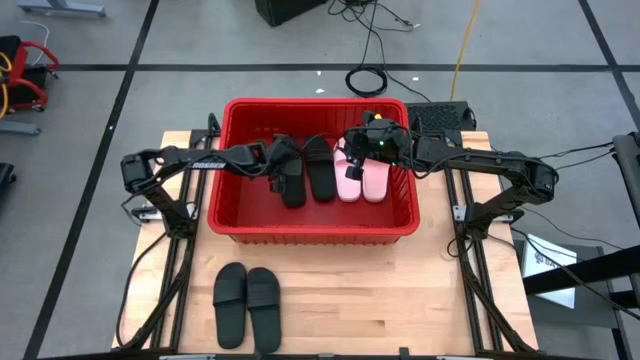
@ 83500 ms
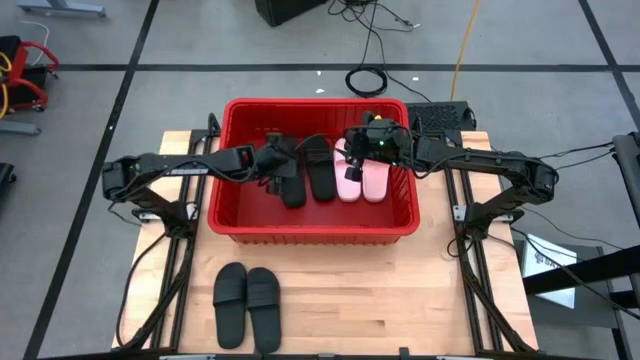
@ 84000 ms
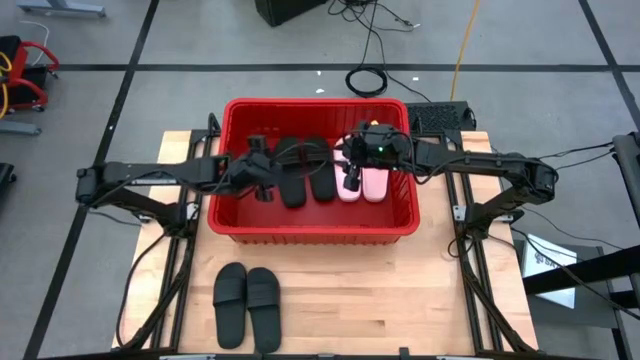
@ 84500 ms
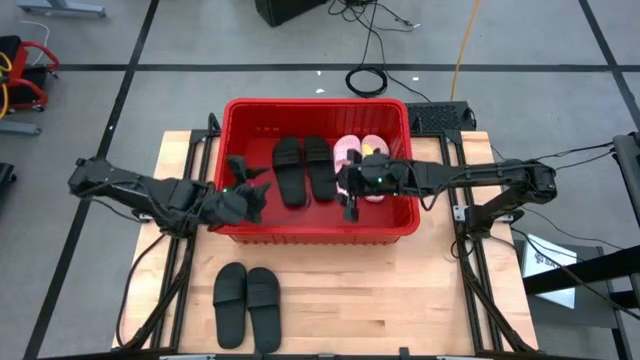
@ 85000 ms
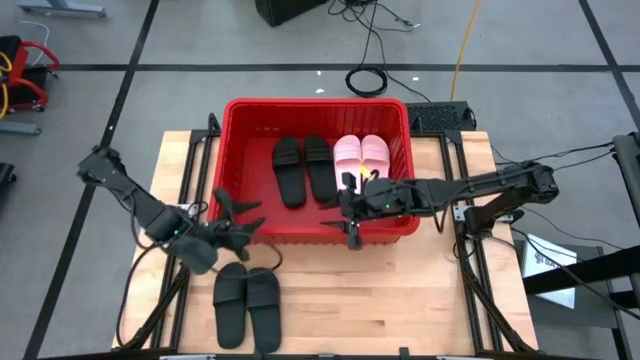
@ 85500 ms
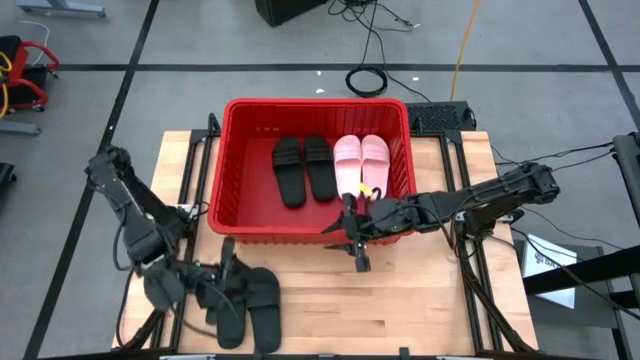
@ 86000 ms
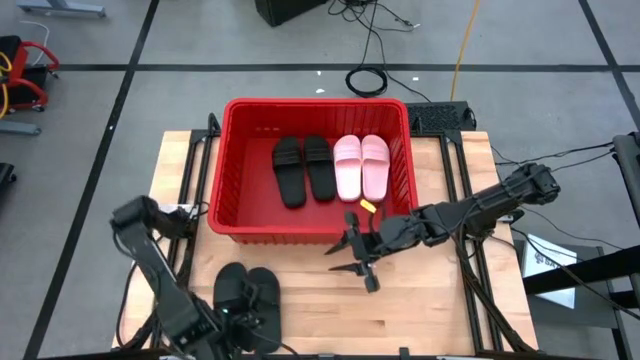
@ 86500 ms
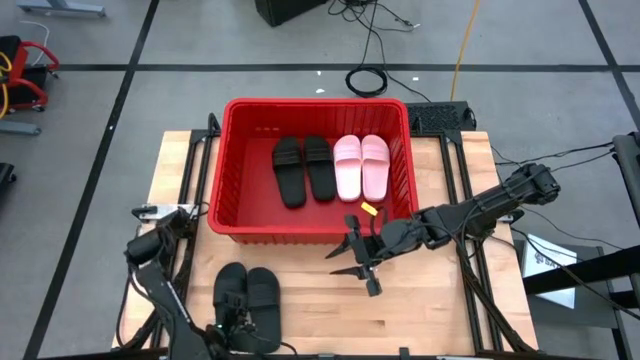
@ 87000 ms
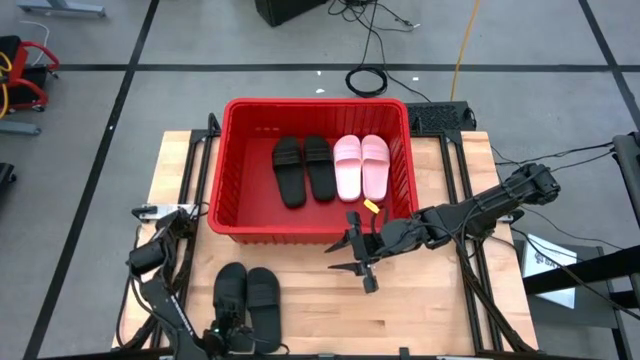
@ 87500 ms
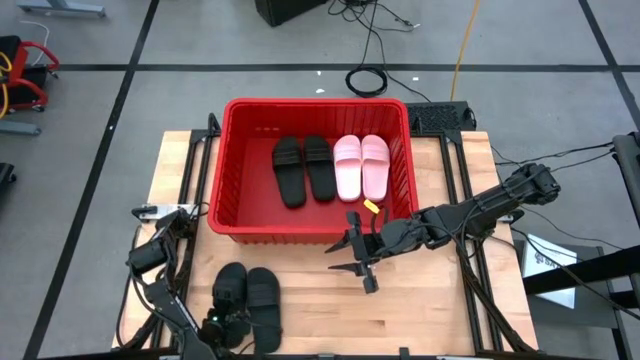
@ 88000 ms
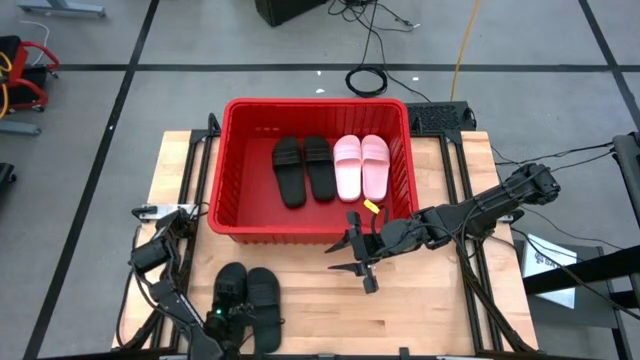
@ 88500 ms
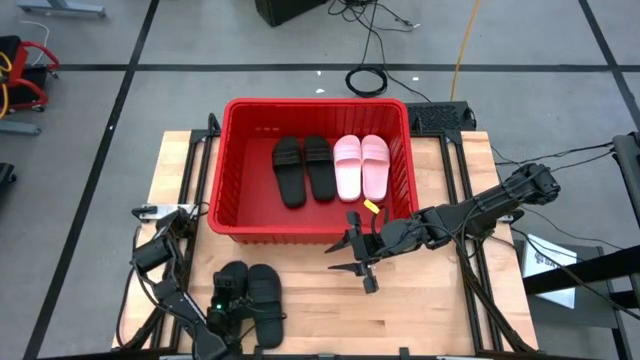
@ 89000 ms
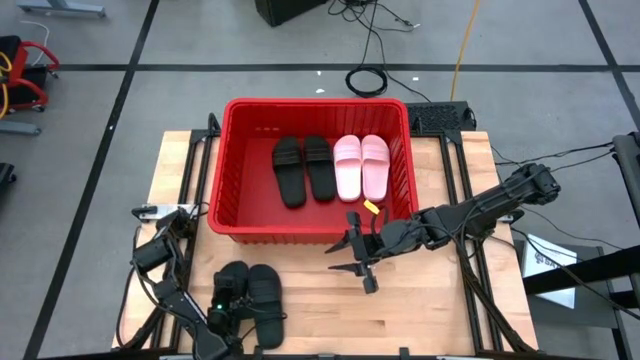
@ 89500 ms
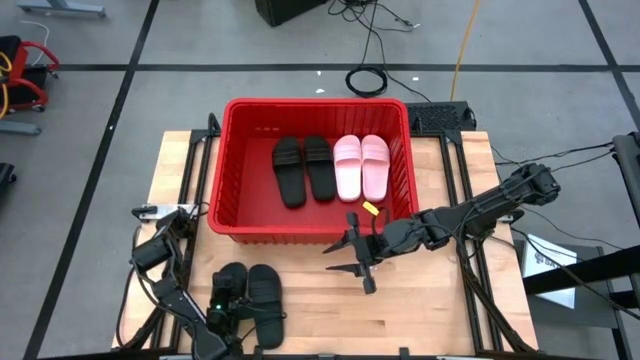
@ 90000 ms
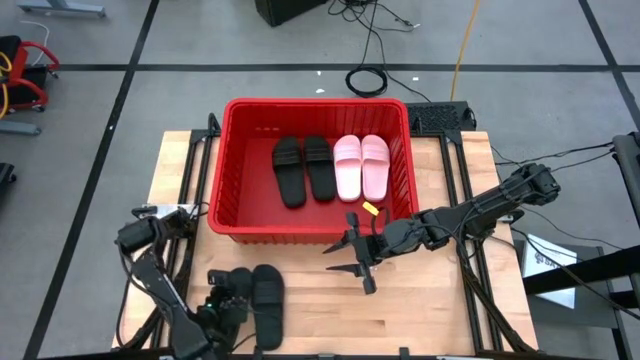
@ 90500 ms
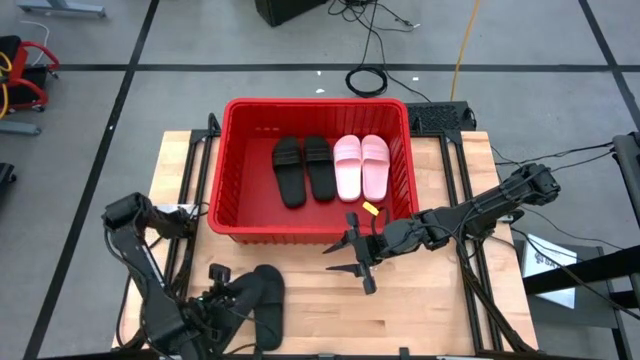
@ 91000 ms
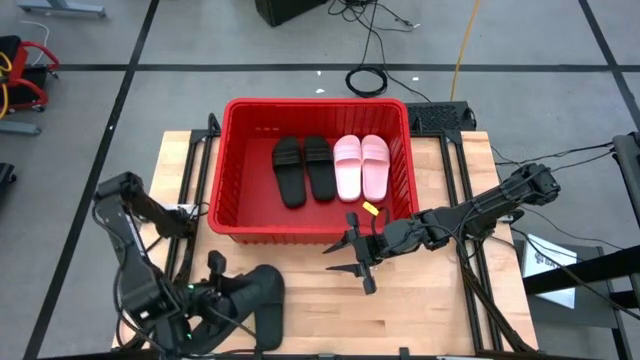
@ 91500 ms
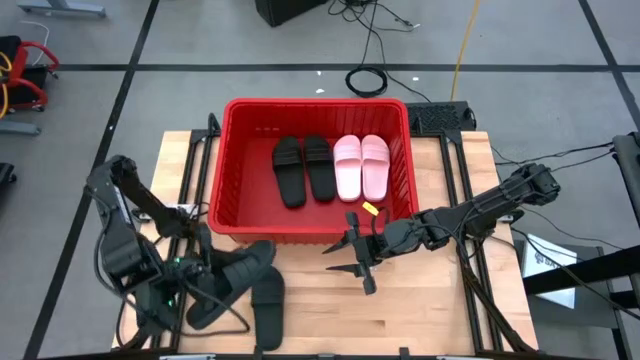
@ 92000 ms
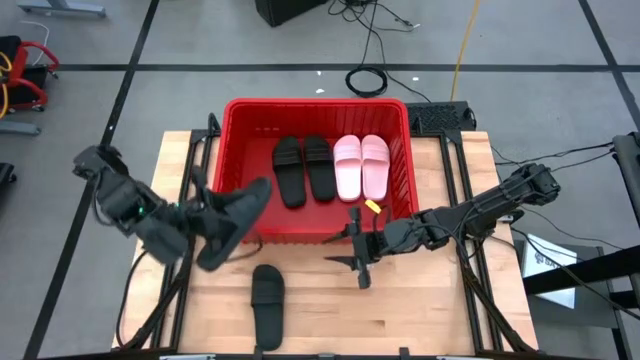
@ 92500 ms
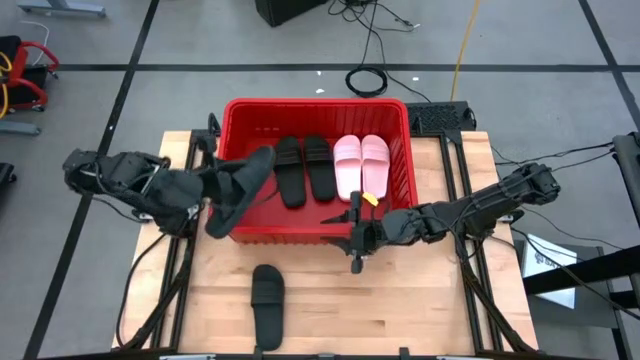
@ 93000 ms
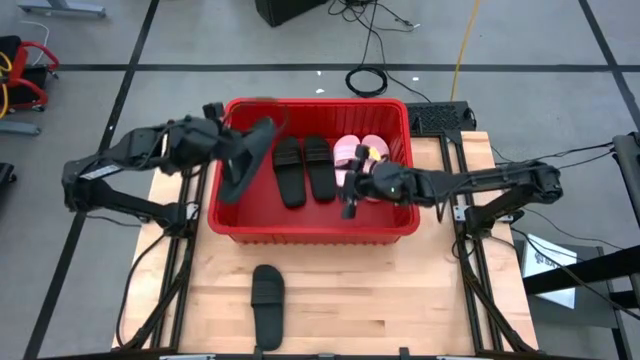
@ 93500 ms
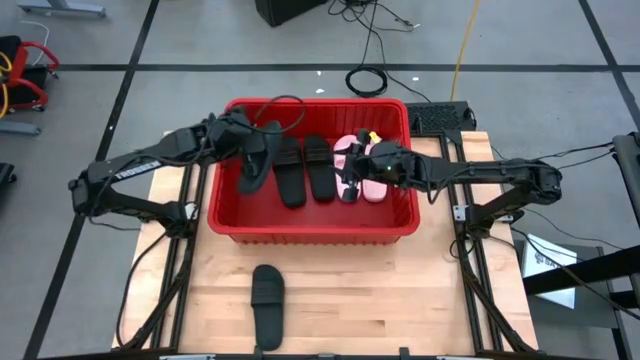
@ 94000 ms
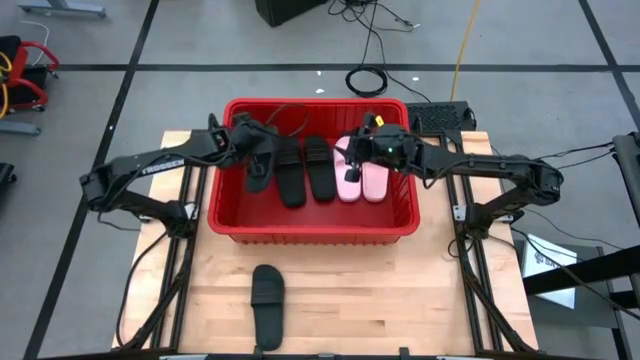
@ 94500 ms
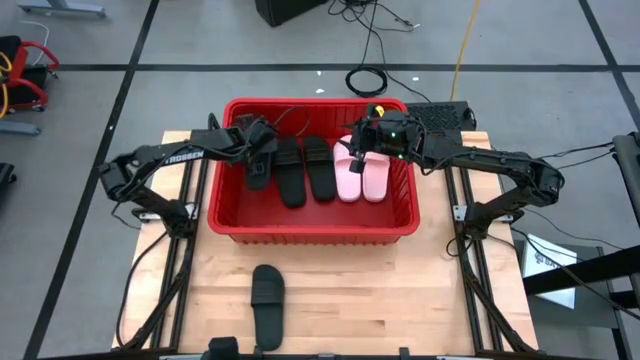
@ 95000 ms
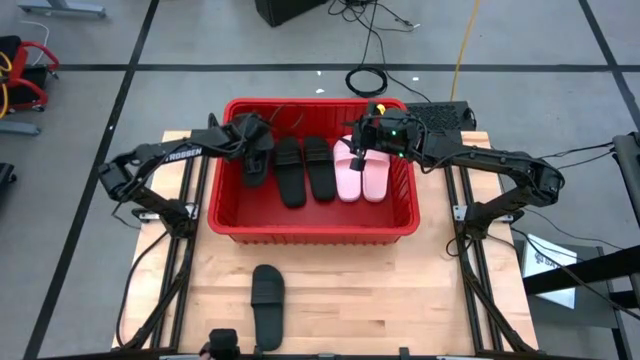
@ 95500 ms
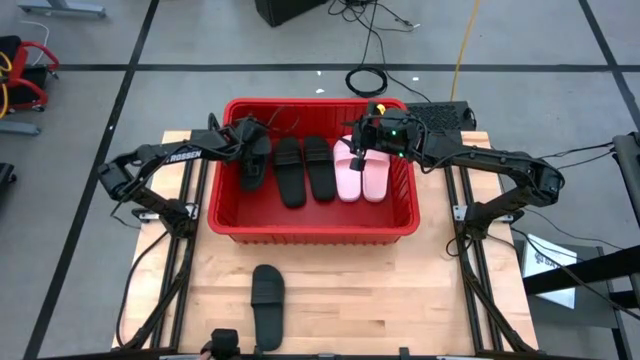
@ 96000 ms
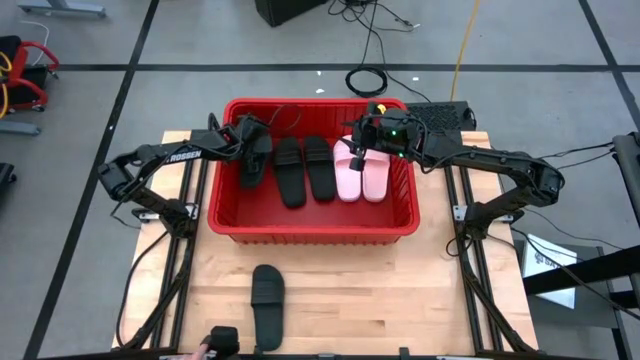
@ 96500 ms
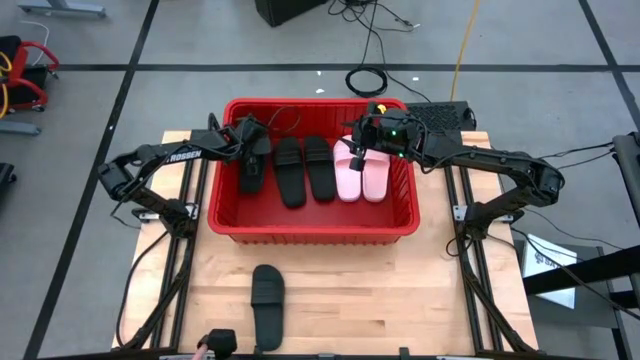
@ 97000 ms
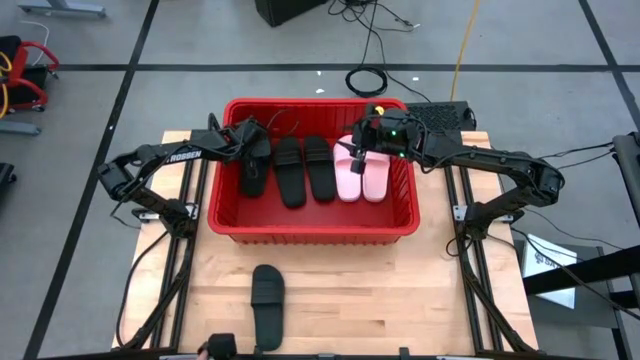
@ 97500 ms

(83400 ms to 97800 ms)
Task: Pick and place slides into bin
Put the black slipper into the red bin
